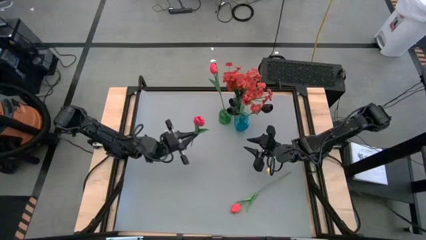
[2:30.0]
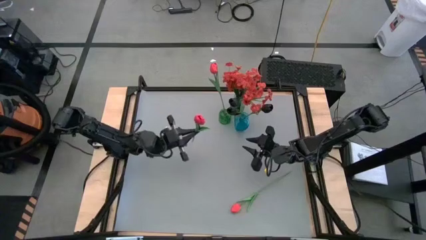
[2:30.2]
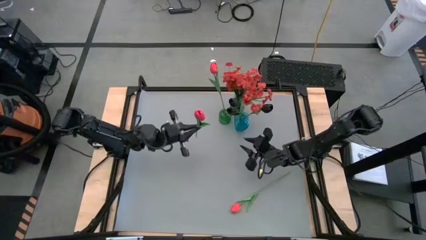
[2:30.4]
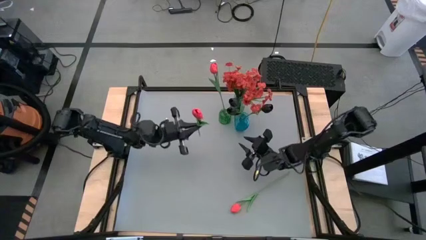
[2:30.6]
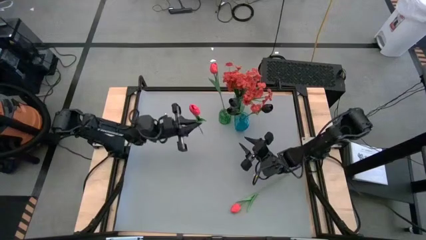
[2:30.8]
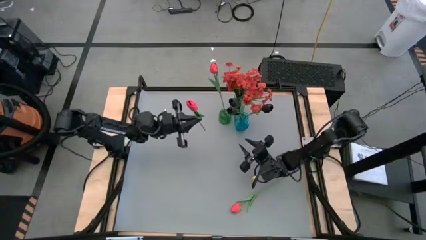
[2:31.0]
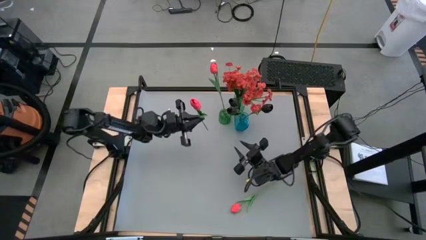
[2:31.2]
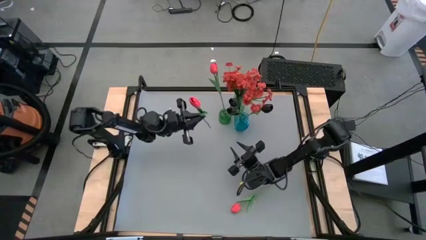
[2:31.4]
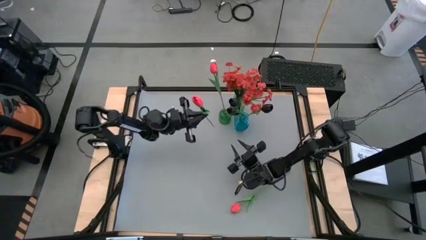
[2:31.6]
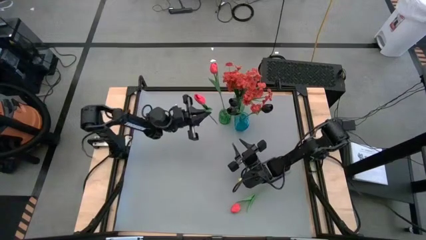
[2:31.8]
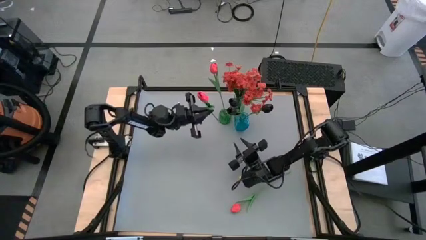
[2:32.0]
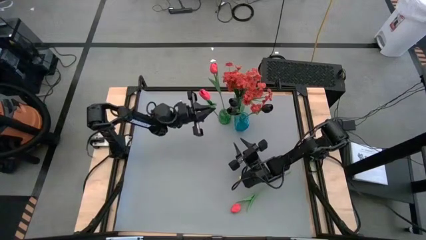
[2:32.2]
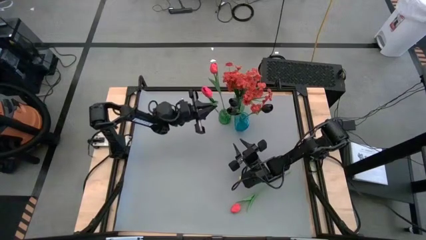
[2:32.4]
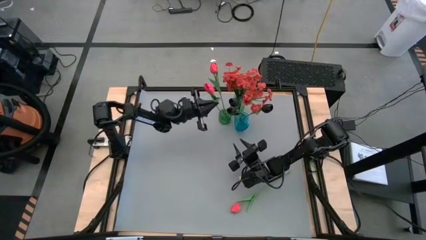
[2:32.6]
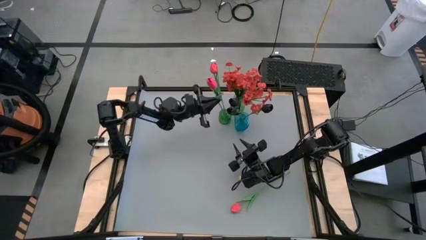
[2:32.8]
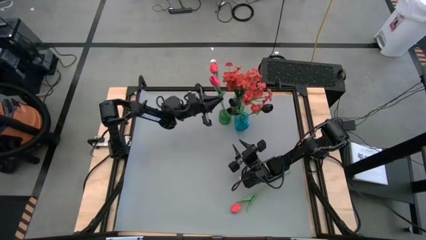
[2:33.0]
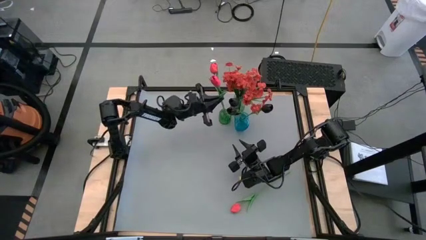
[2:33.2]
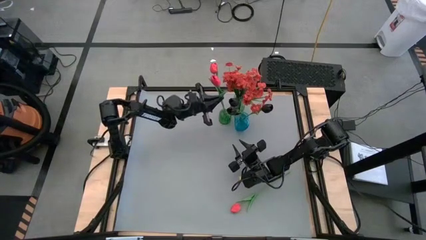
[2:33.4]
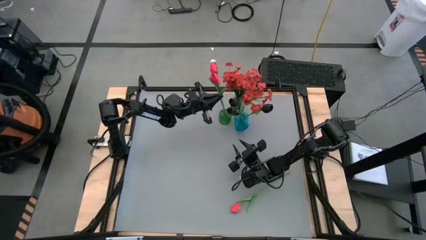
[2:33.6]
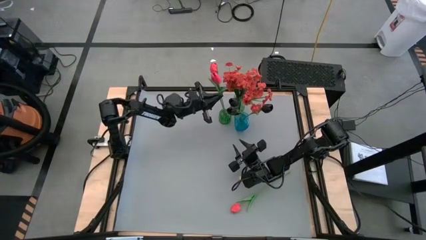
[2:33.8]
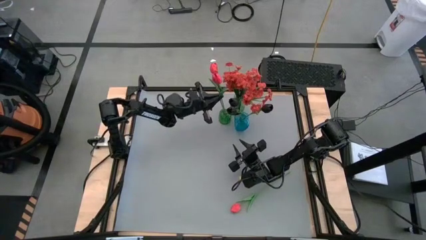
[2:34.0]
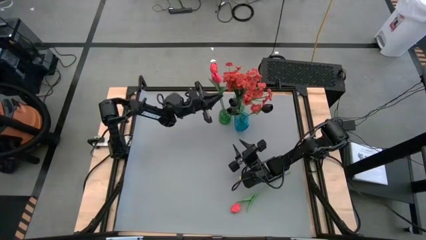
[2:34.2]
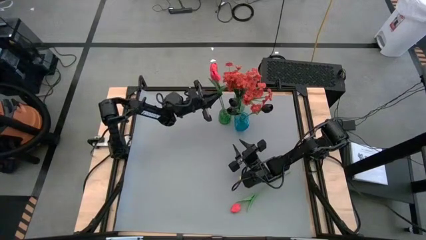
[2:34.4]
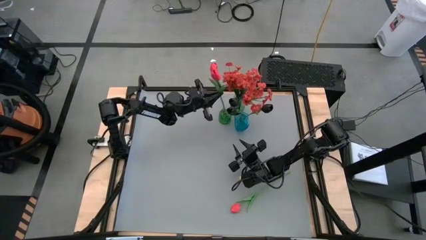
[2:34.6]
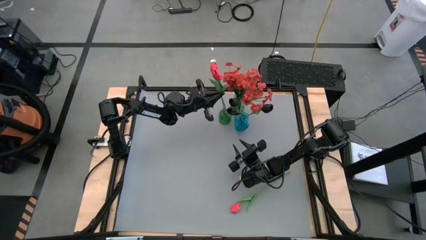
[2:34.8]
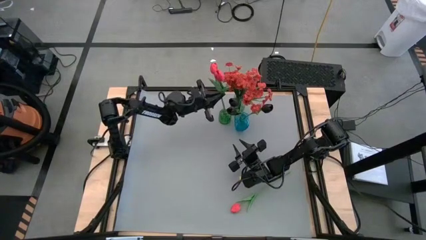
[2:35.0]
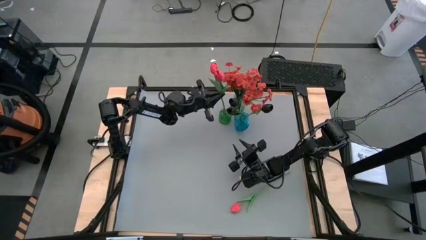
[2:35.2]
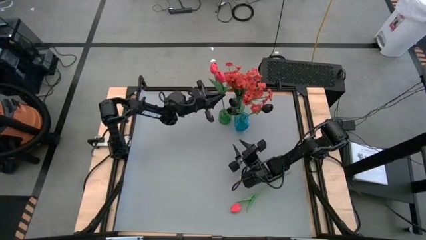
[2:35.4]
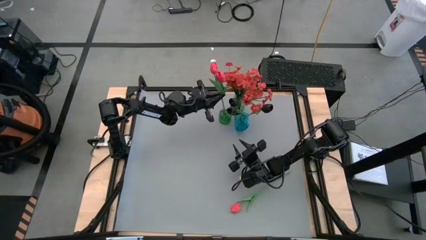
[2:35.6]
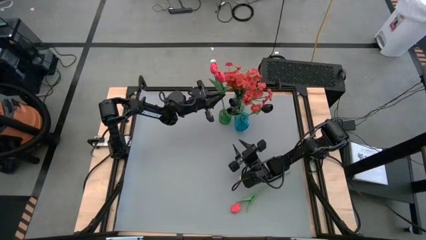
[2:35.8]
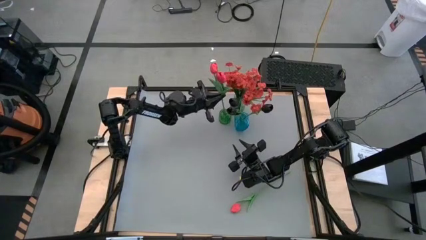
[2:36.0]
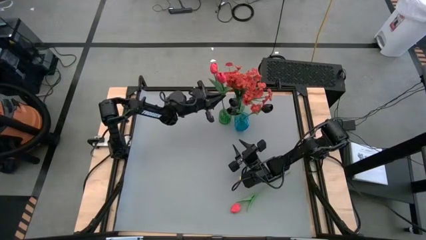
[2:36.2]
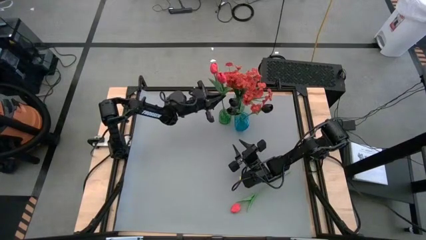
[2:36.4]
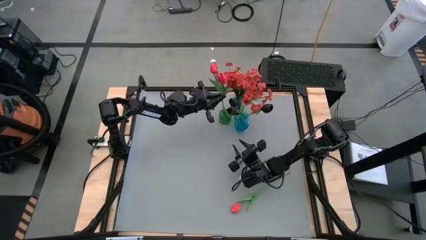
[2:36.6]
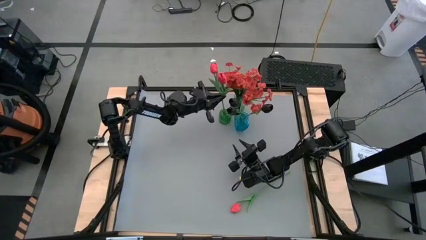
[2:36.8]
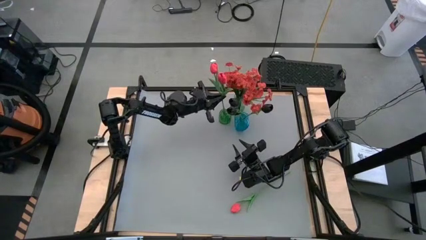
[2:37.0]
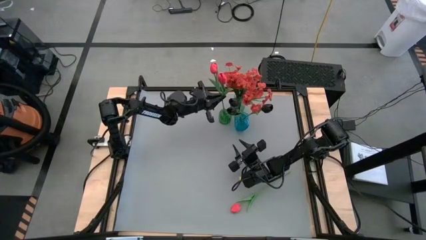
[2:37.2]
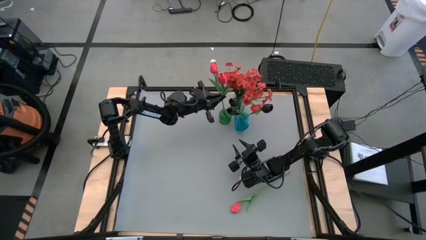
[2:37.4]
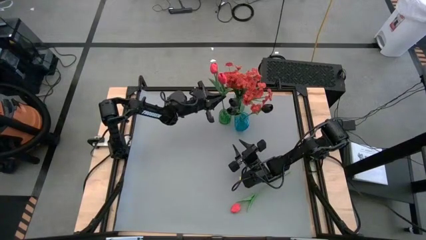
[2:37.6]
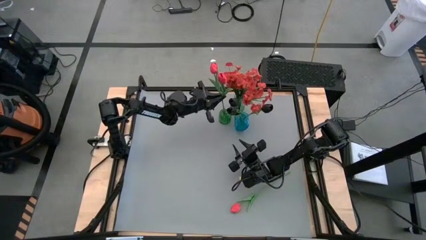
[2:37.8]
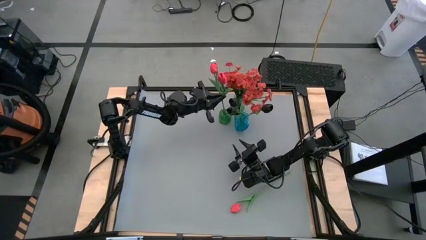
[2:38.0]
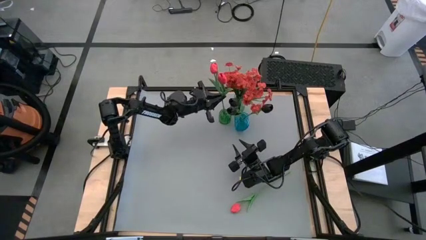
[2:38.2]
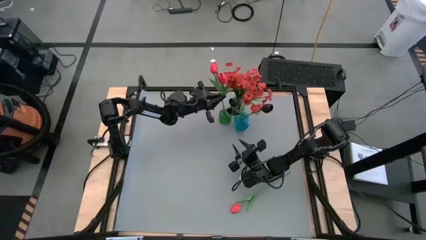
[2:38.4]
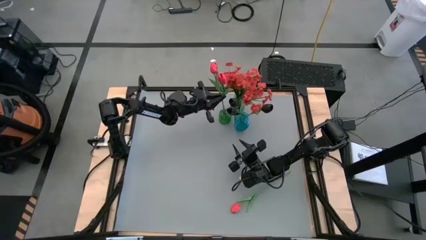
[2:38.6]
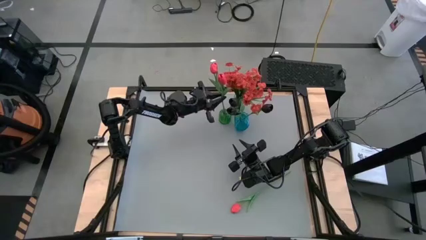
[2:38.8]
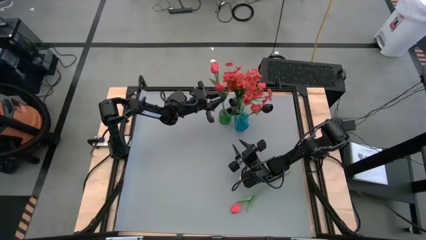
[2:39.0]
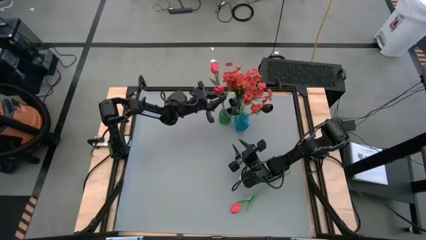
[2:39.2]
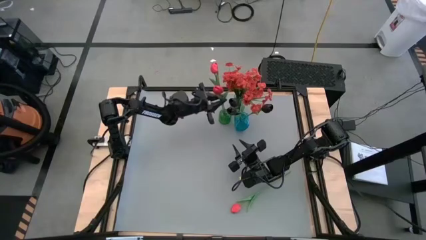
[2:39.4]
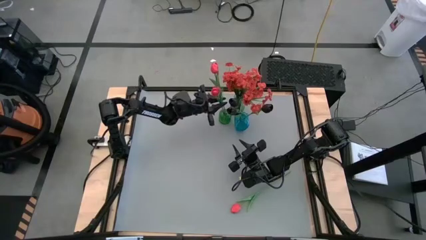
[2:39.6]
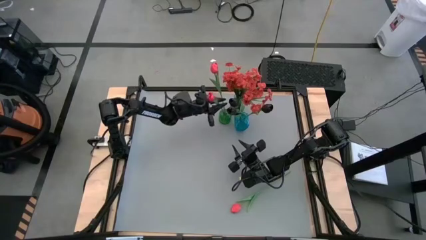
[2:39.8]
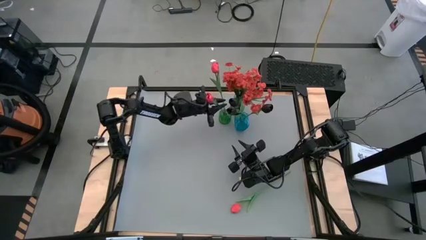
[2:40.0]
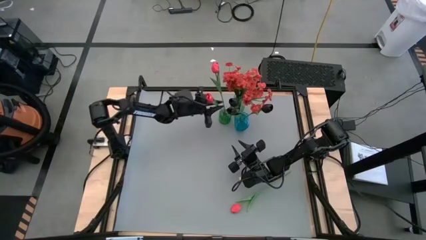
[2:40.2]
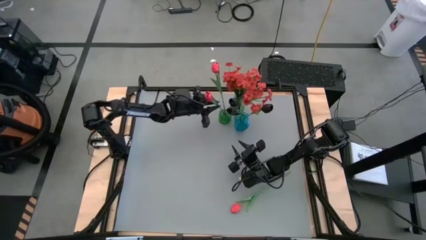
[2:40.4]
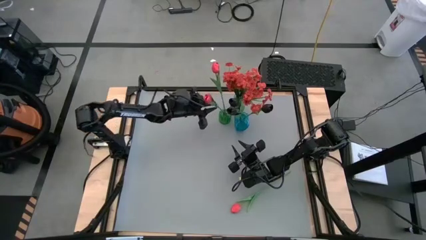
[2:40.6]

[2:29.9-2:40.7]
Task: Sort flowers into vase by color
Put the left pink flower into the bottom green vase

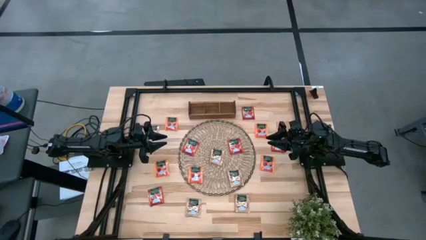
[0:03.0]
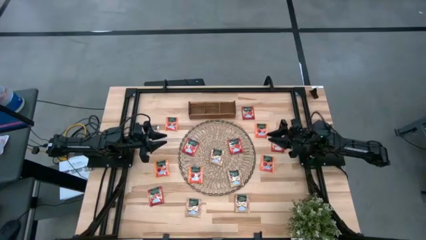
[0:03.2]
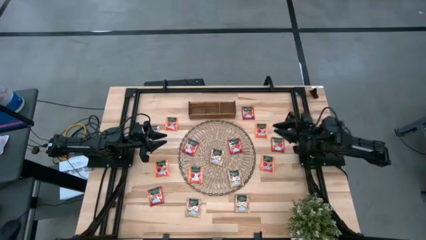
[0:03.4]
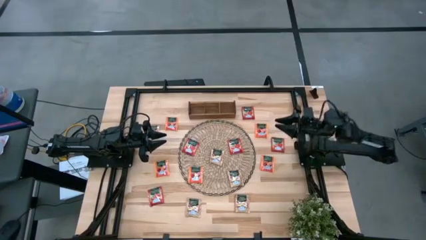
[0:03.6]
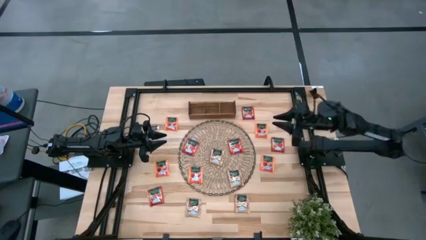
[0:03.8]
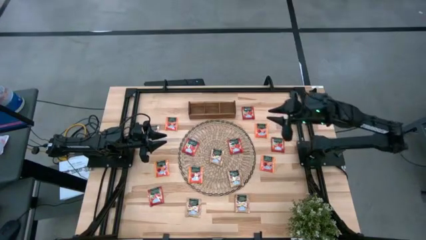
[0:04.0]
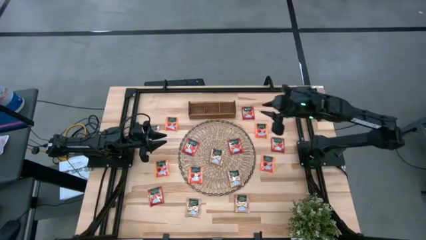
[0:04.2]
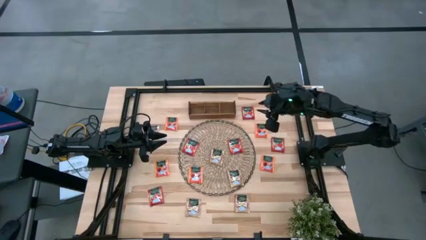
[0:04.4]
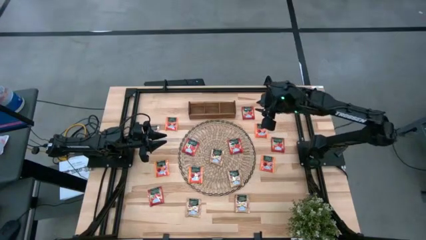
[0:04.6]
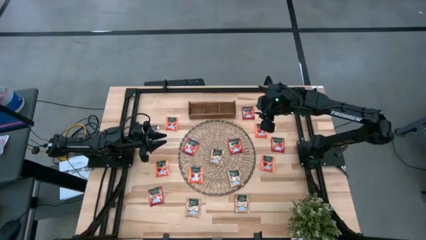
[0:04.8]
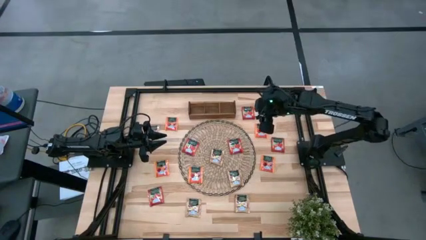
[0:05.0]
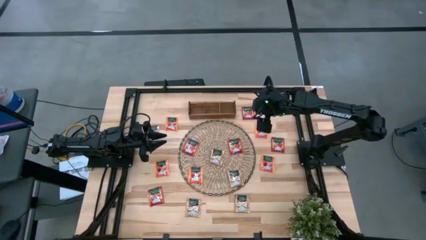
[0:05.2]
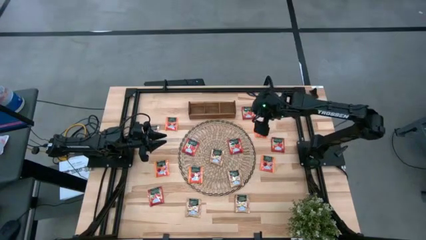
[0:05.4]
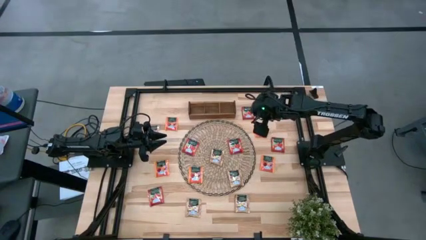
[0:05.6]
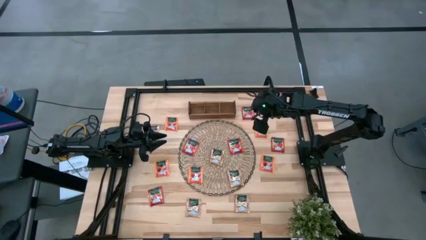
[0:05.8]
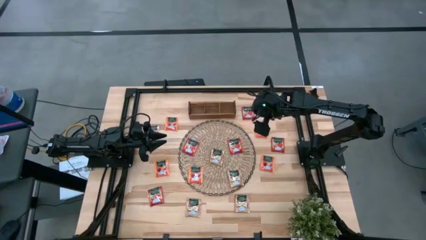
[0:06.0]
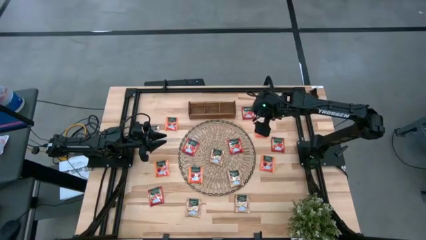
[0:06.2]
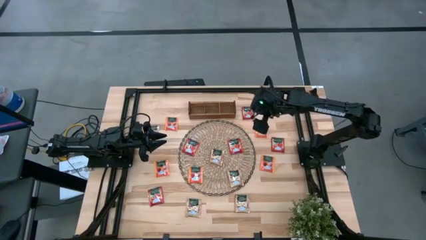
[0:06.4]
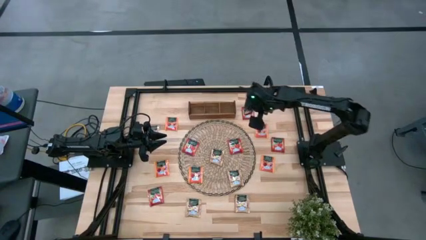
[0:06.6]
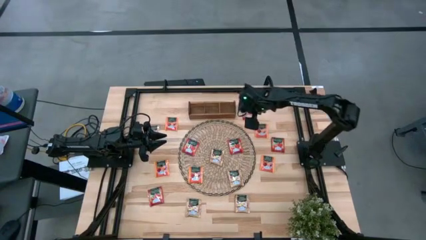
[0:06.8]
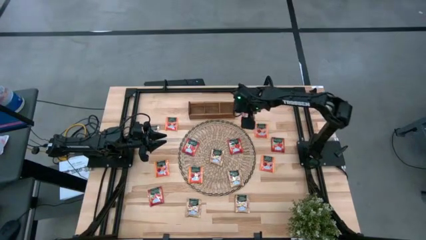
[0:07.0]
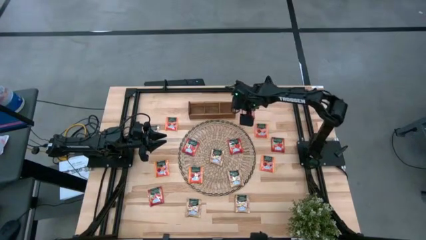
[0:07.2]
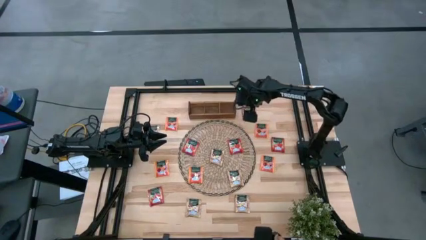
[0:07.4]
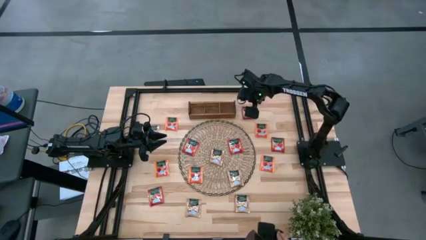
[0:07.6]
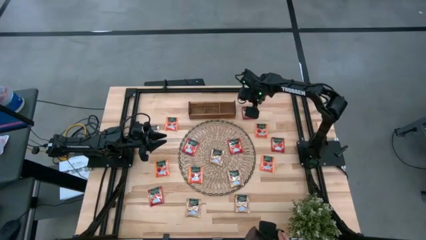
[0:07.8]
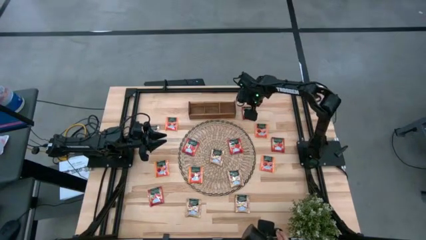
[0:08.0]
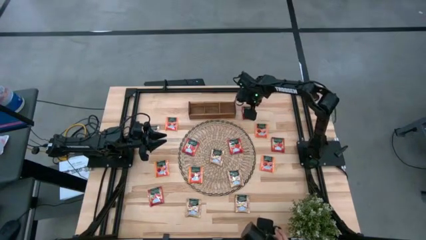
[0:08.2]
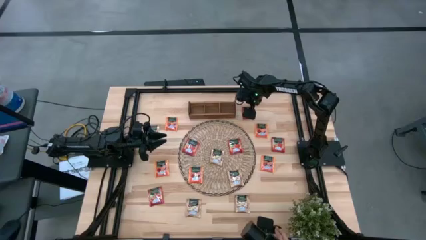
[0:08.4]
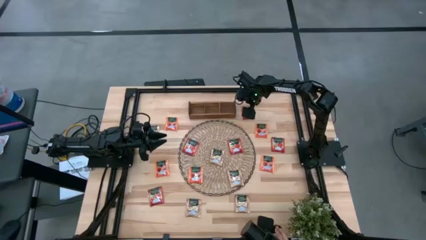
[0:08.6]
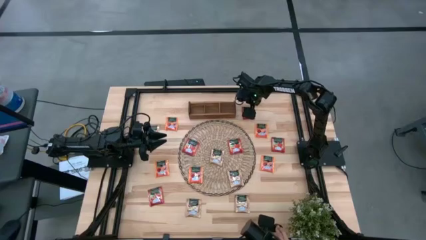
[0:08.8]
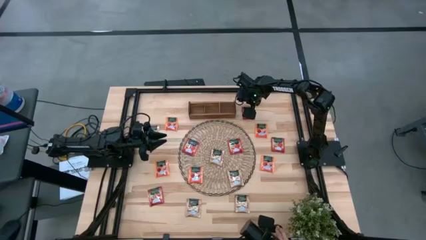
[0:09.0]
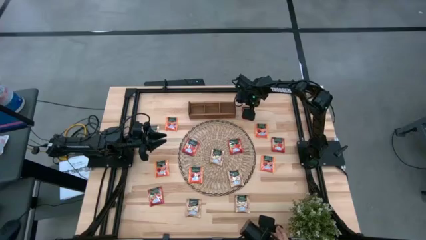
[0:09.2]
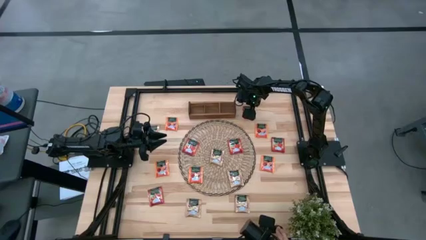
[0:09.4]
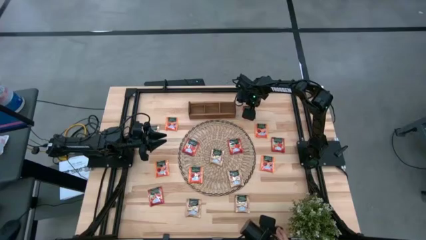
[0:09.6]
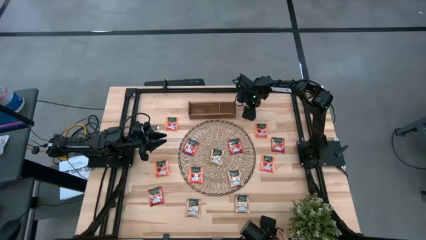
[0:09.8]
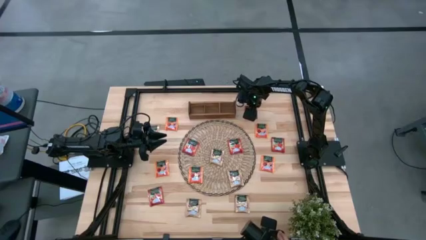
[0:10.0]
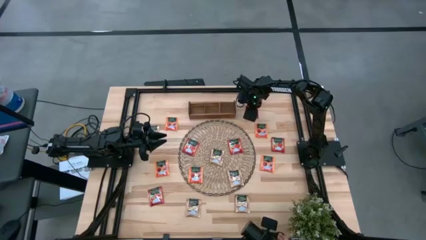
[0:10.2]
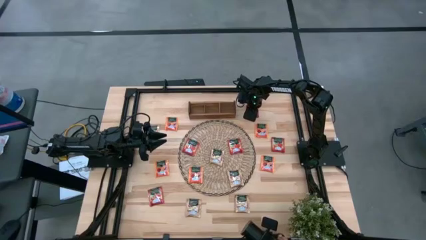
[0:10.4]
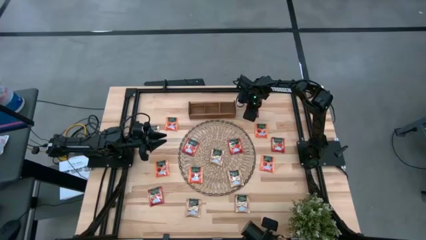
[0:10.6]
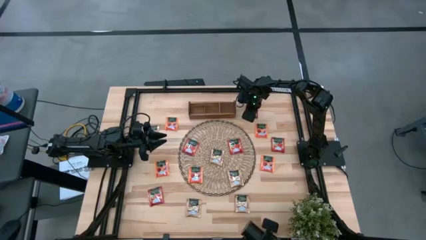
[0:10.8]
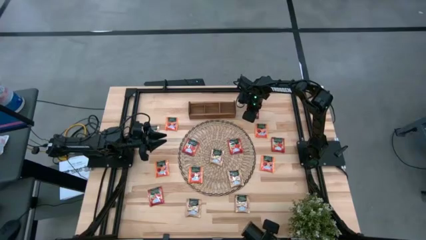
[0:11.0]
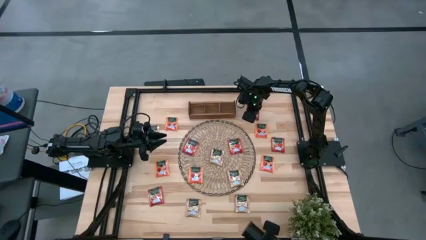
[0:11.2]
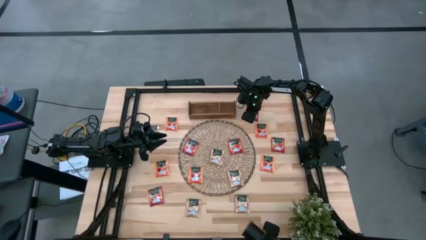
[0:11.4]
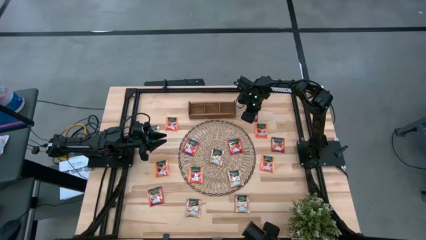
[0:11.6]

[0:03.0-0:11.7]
Task: Pick & Place Tea
Put the red tea bag into the right section of the wooden organizer
